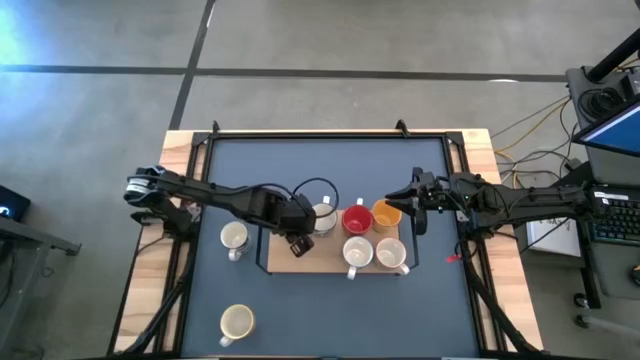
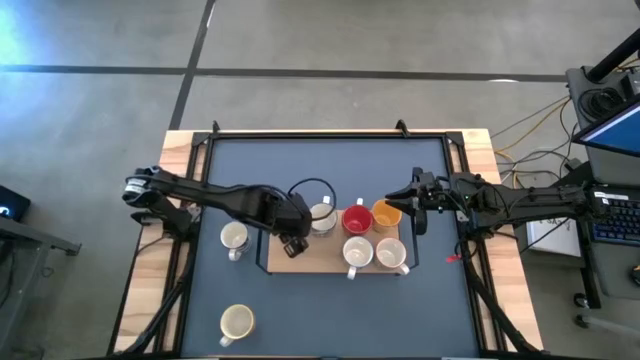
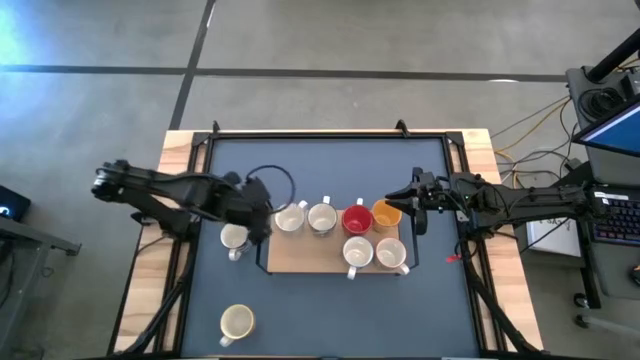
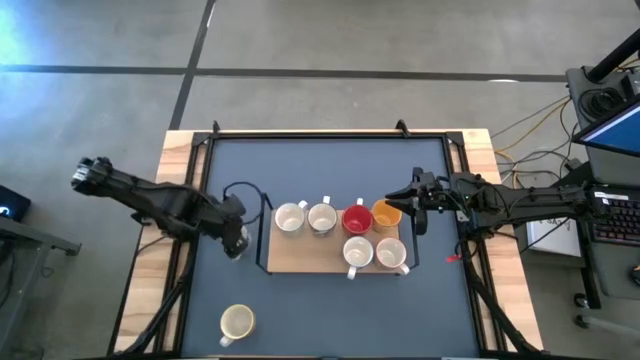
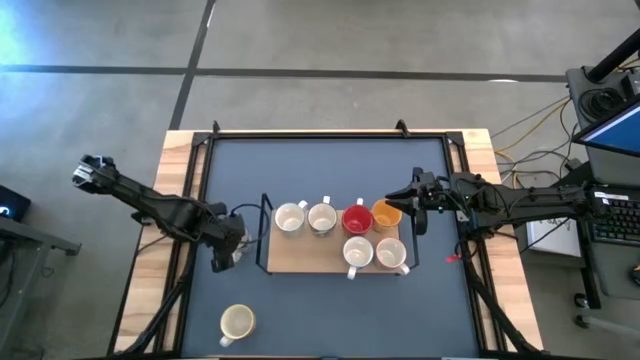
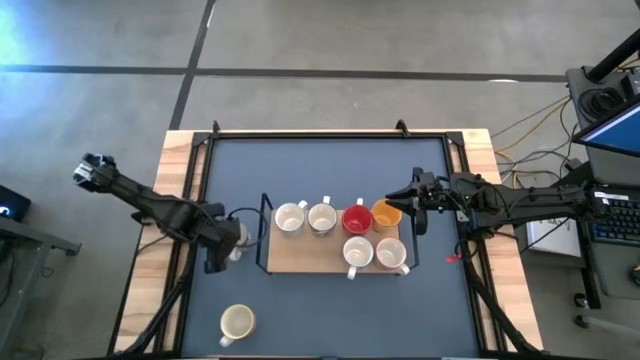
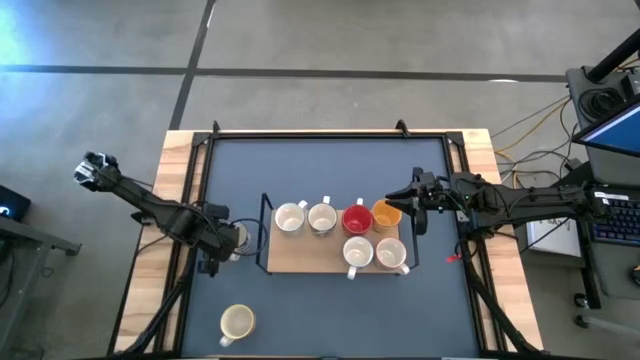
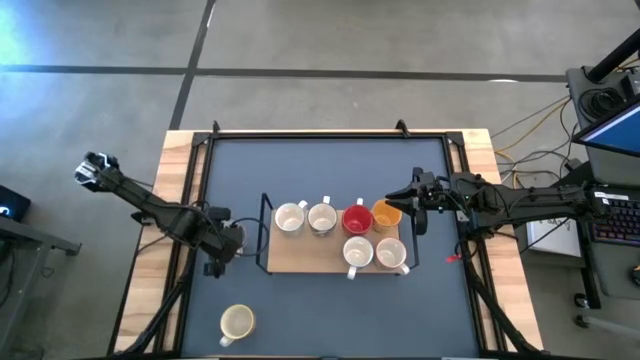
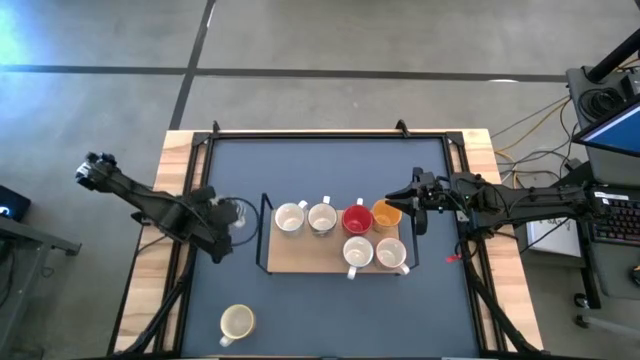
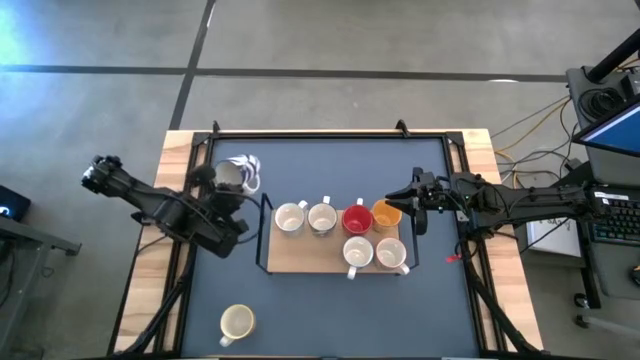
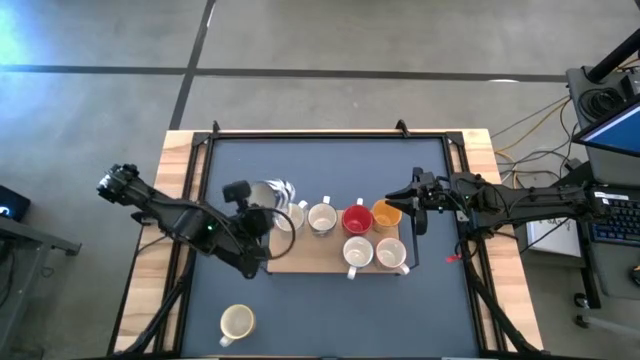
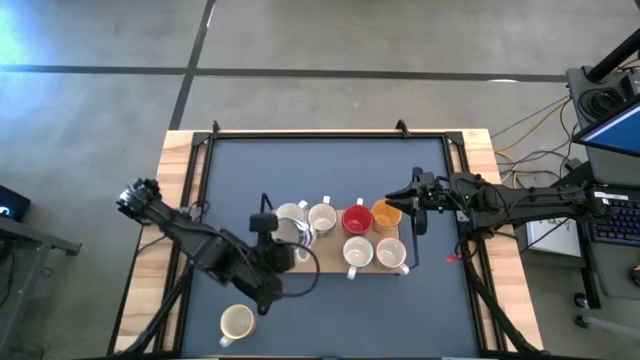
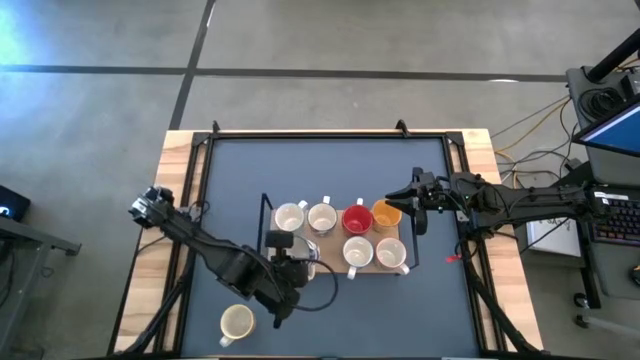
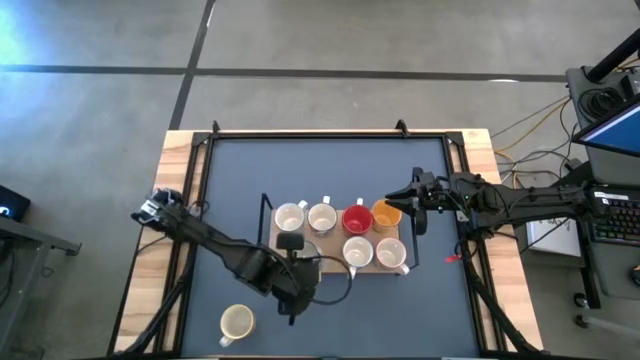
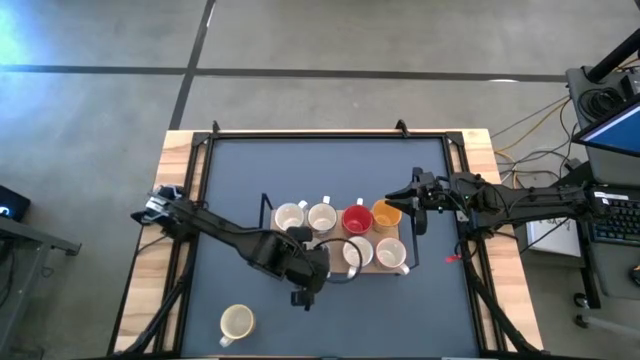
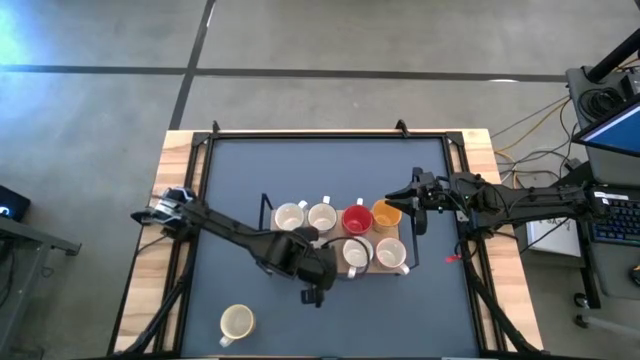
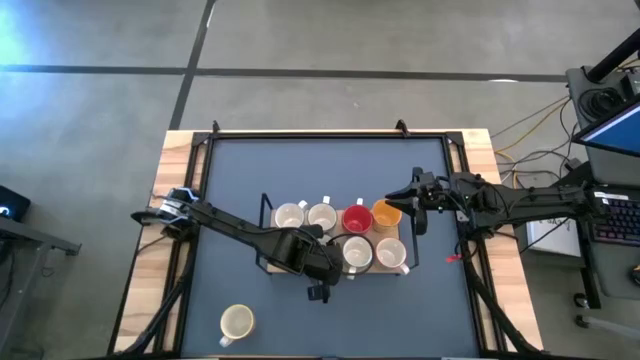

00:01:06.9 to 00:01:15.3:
Task: Place coffee mugs
Put the blue cup on the shelf aligned with the other blue cup

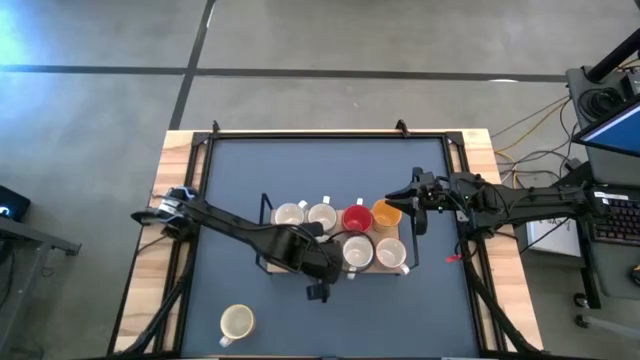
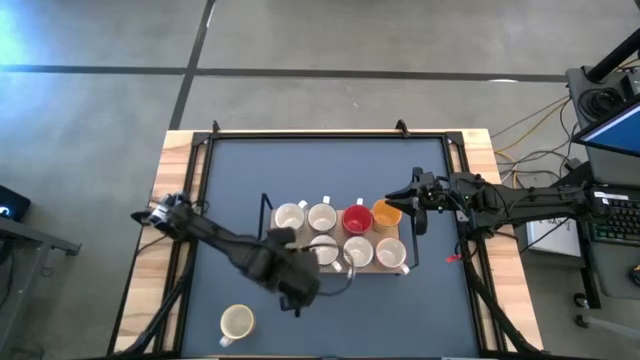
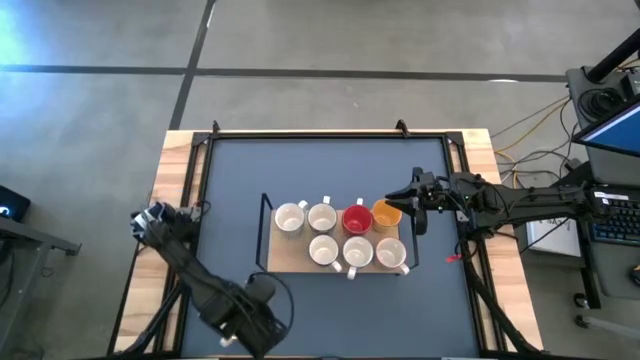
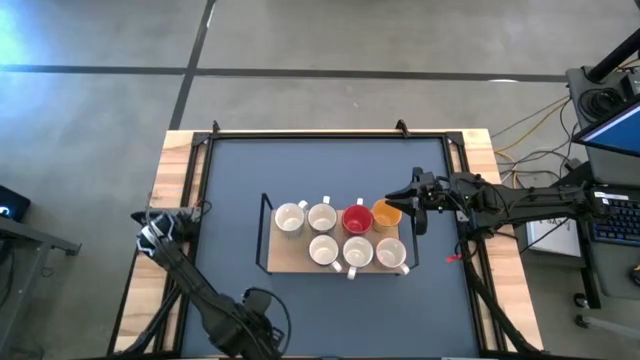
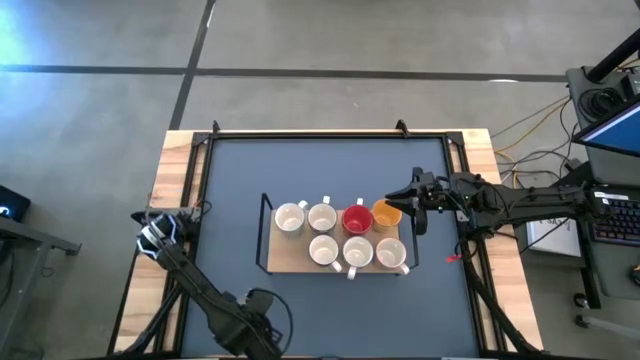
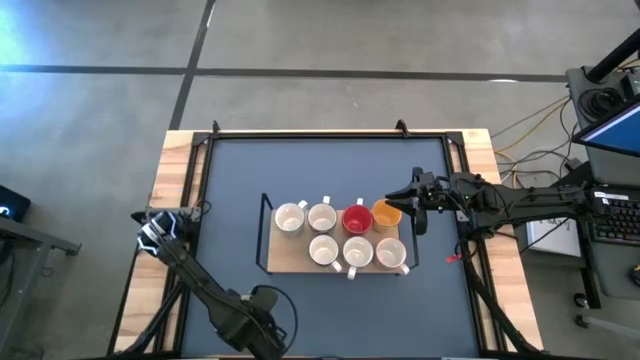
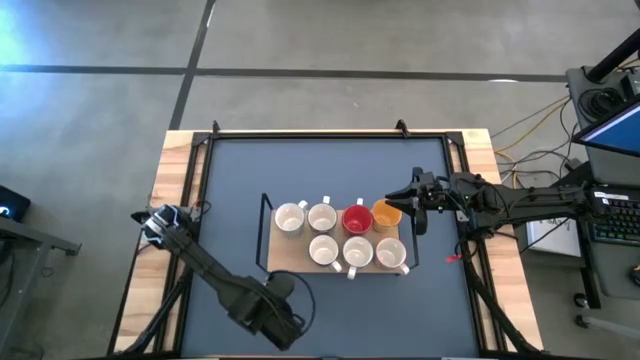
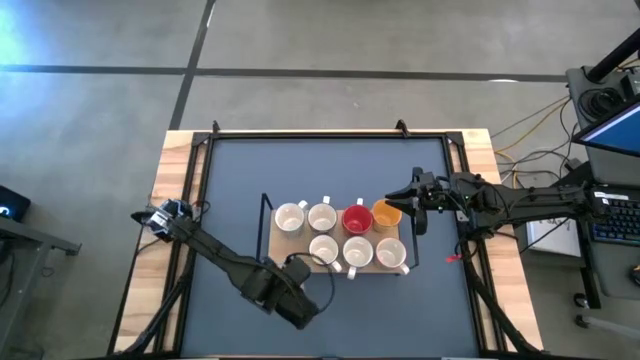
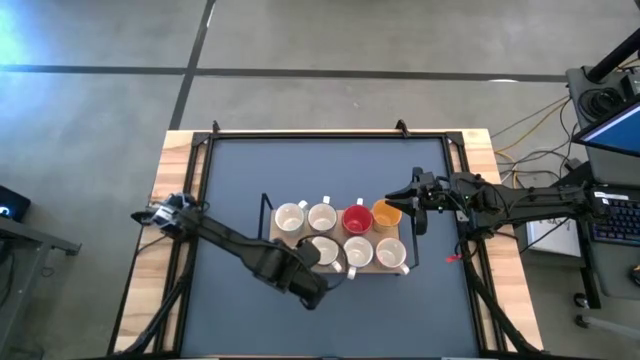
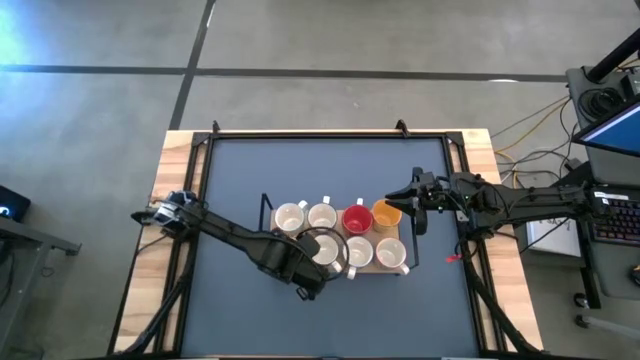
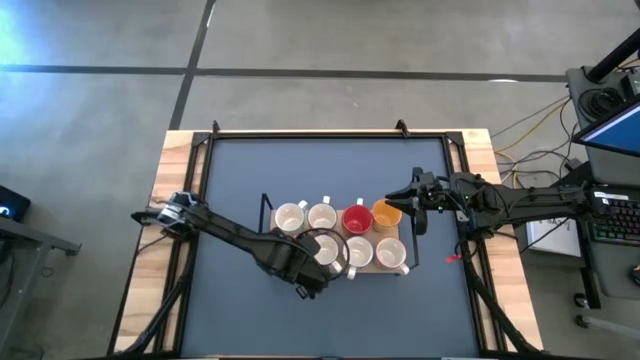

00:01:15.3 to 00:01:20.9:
Put the orange on the shelf aligned with the other green cup

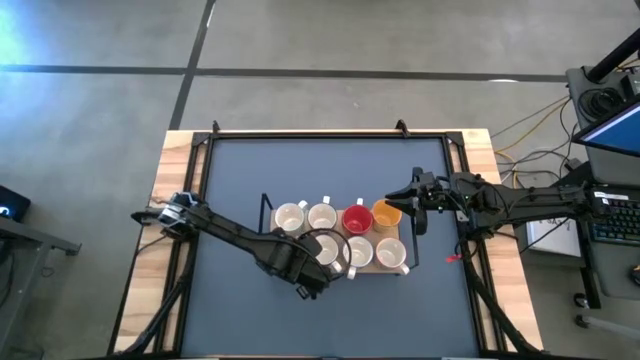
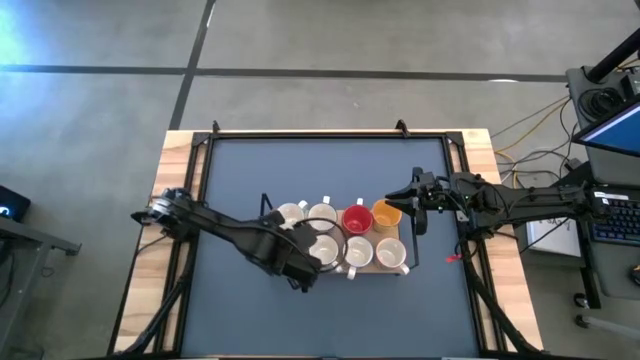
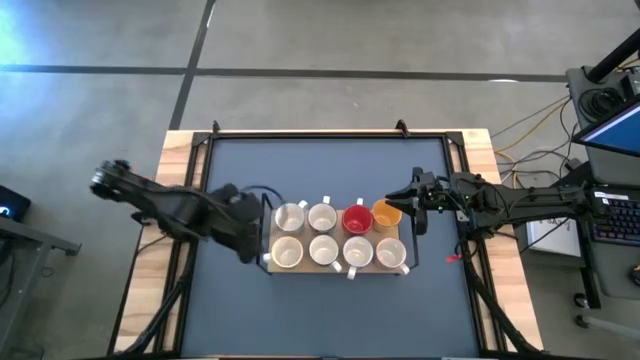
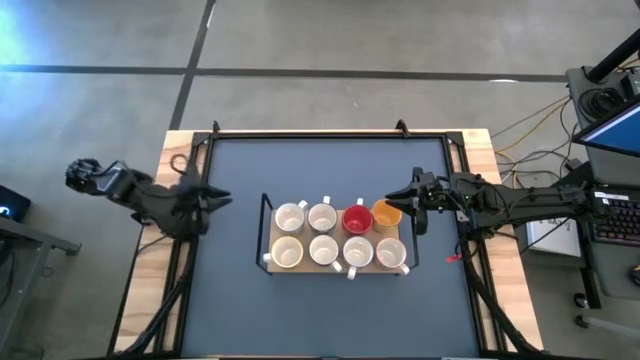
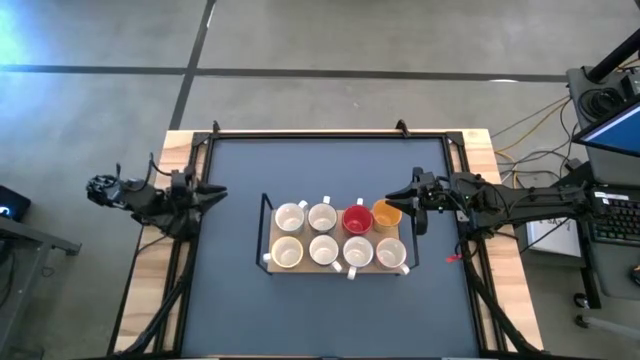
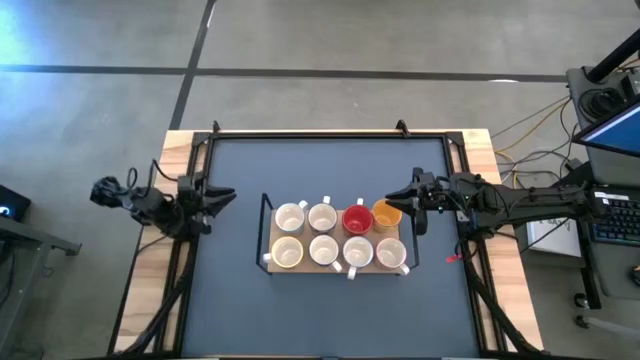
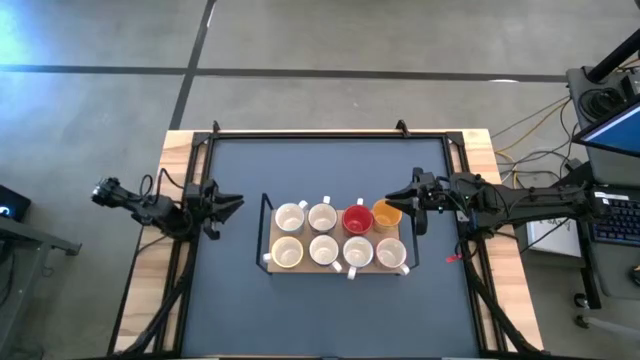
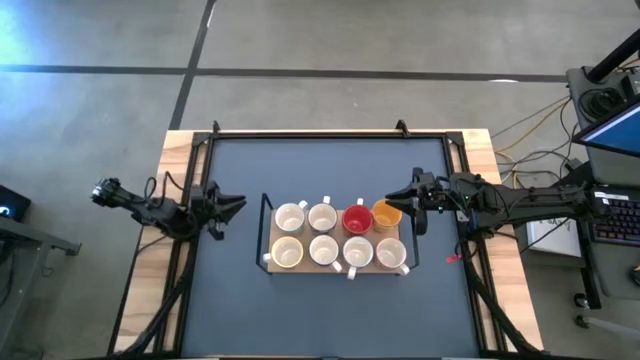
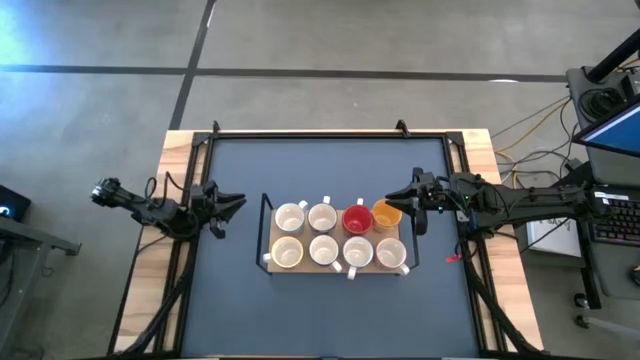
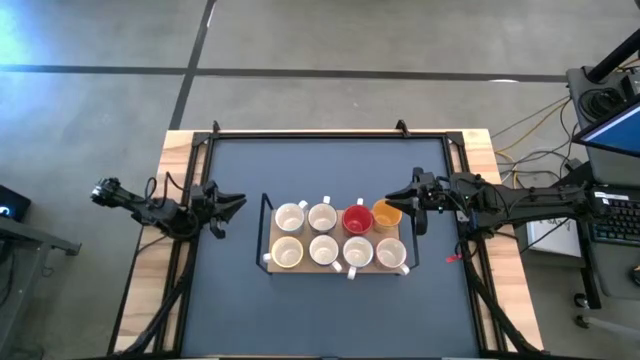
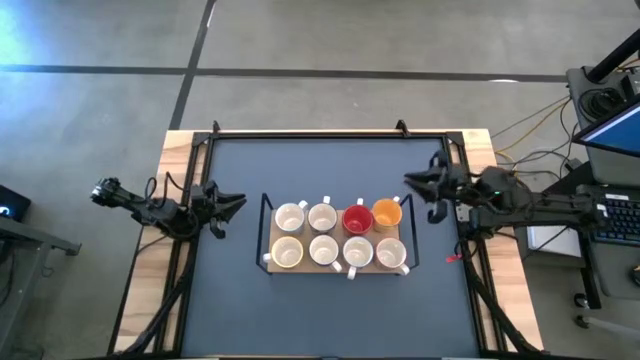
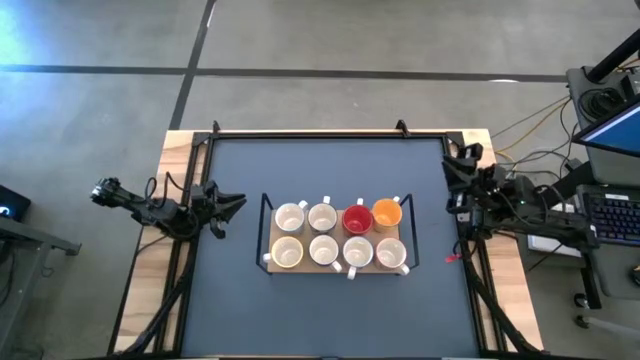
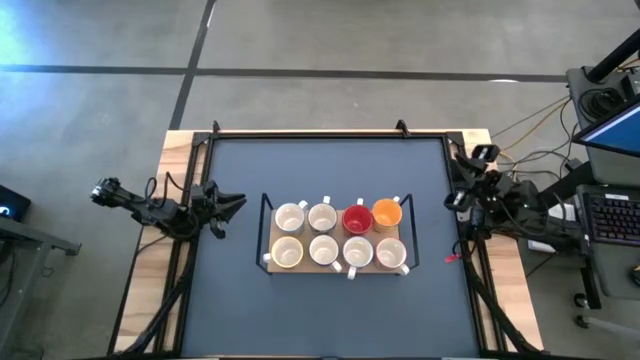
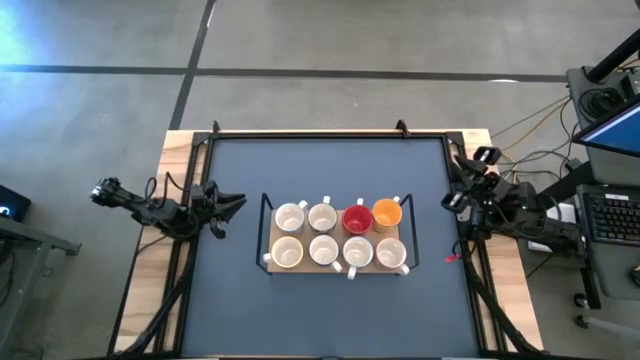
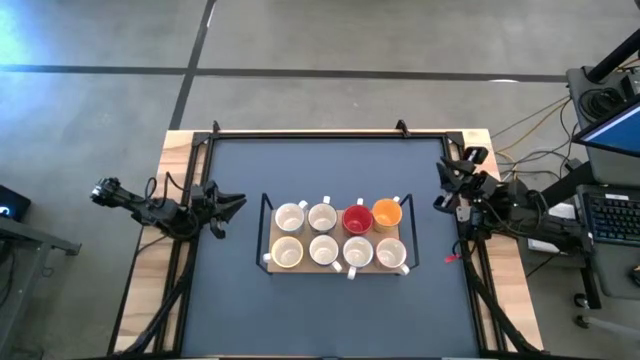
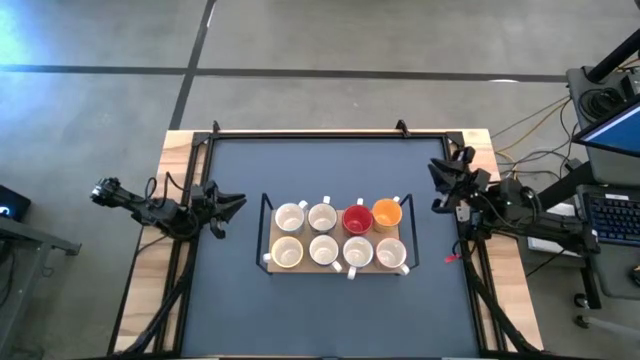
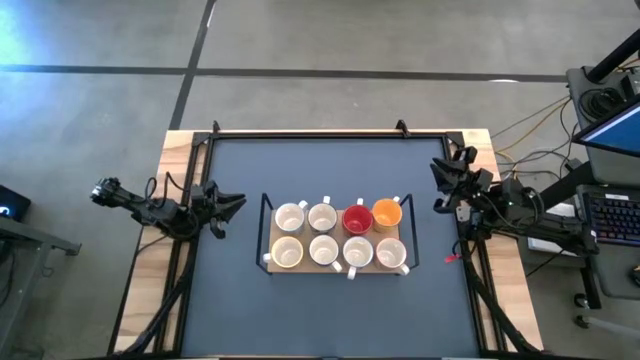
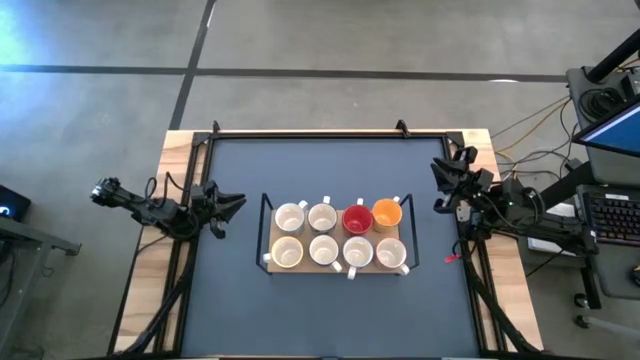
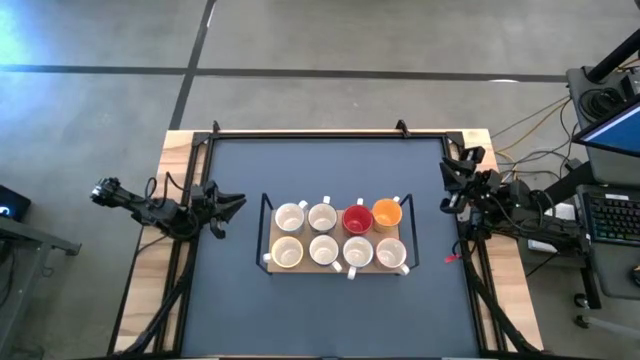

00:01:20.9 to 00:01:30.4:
Return to Home Position
